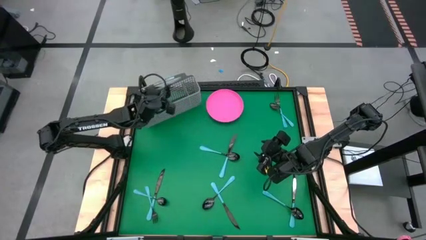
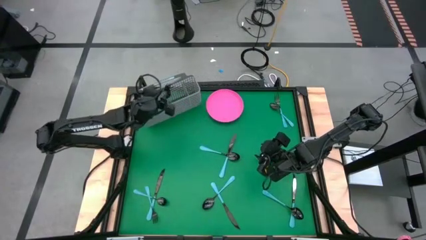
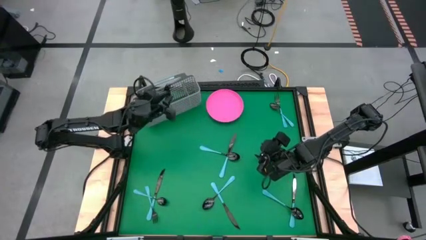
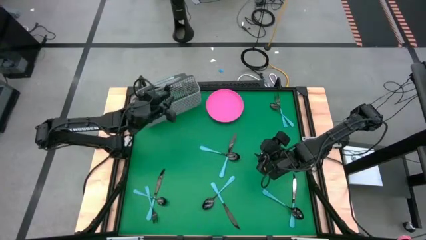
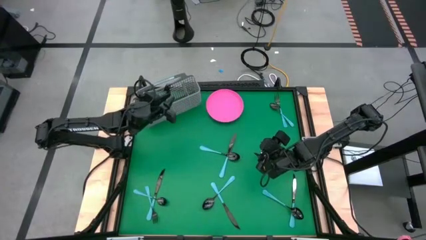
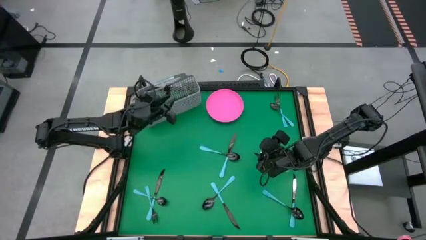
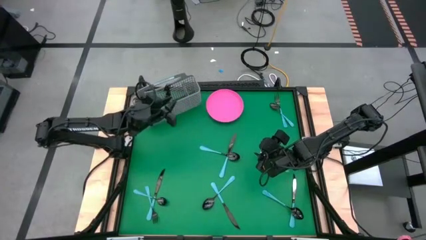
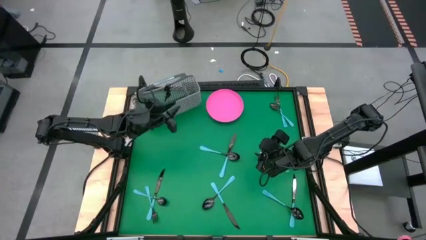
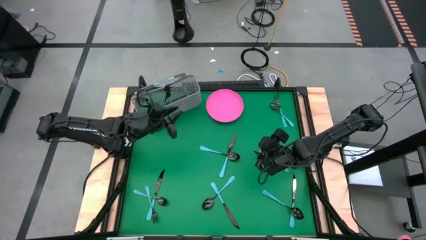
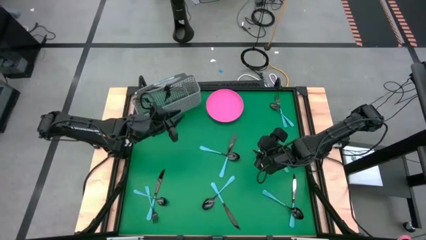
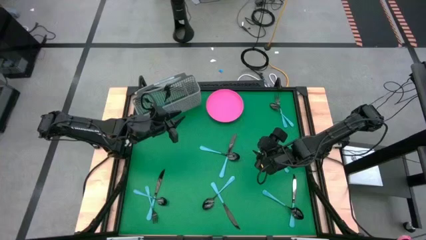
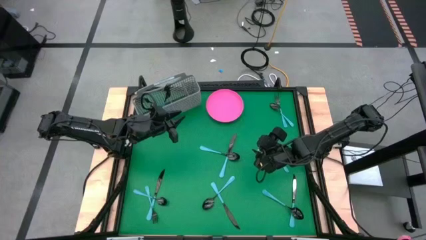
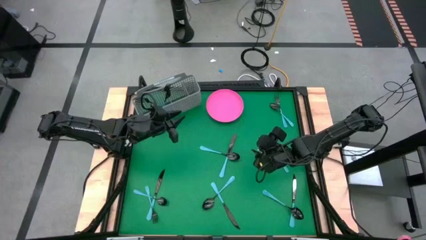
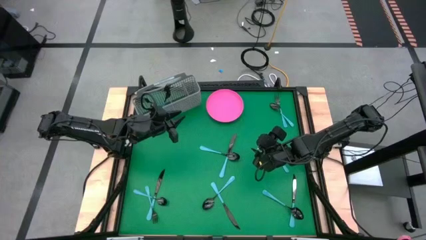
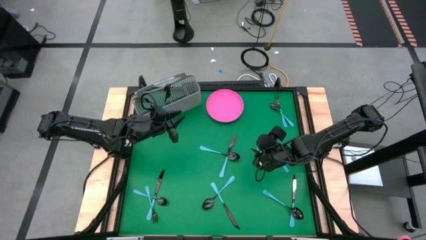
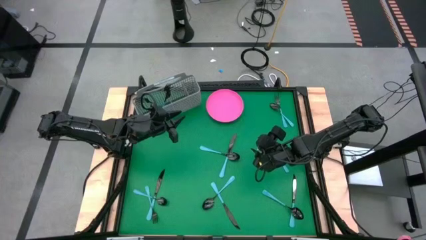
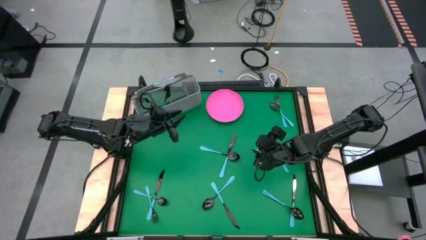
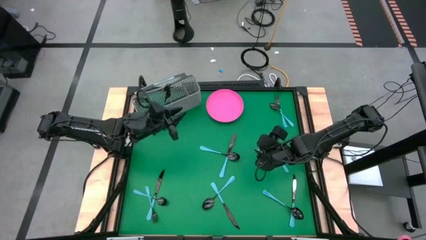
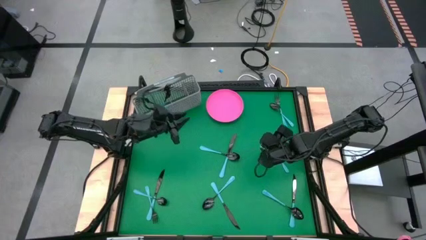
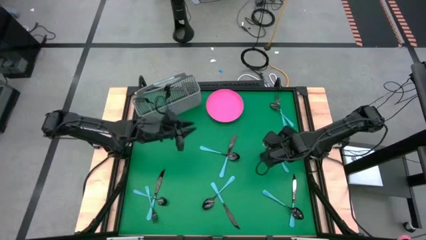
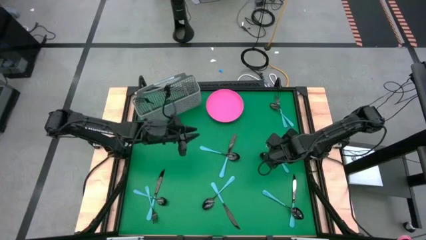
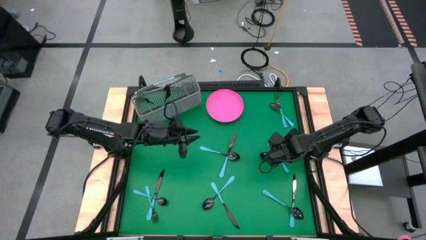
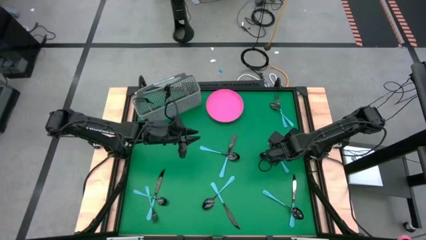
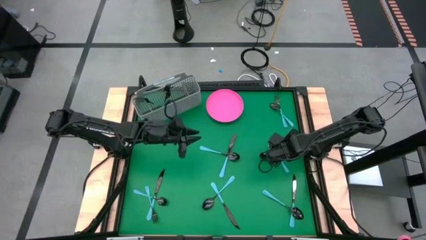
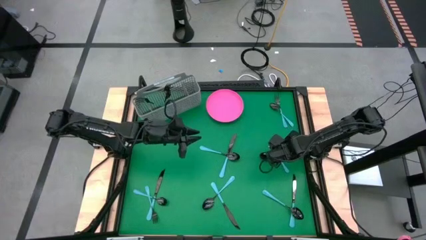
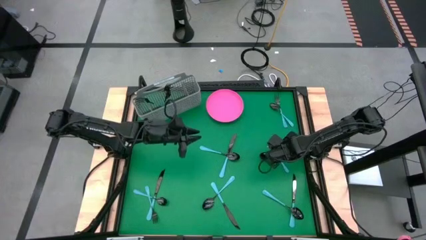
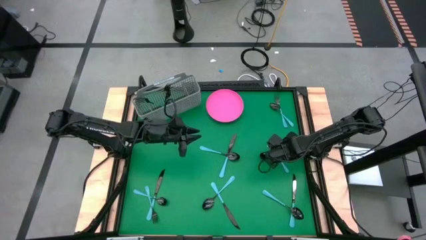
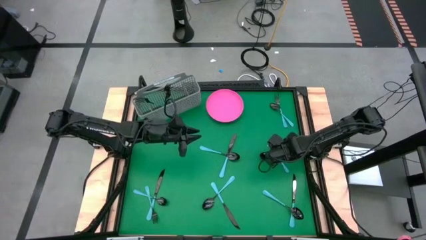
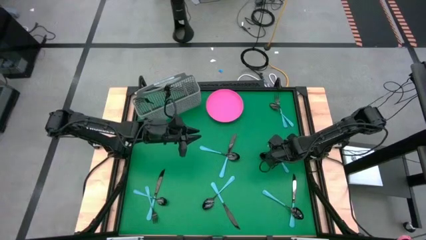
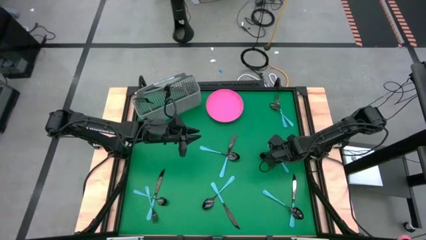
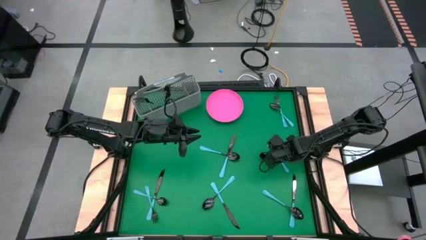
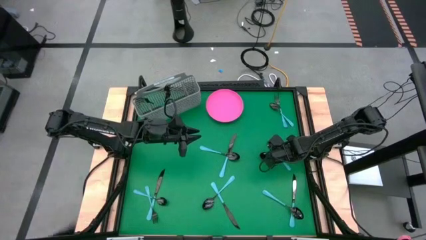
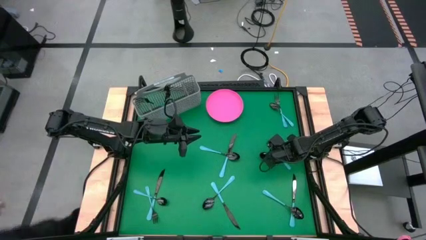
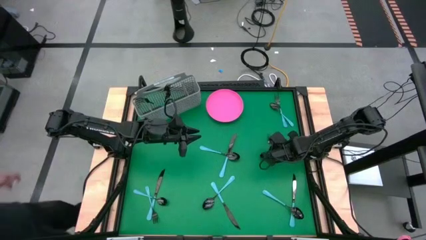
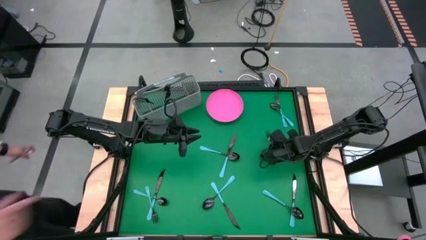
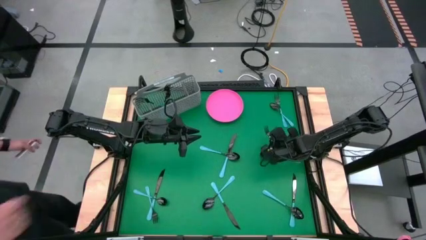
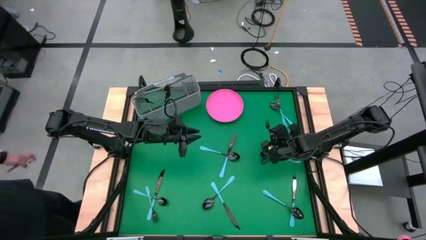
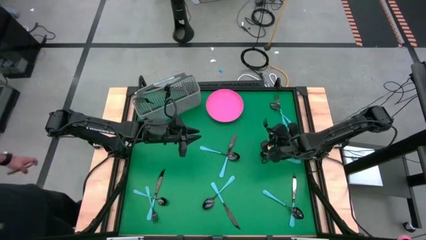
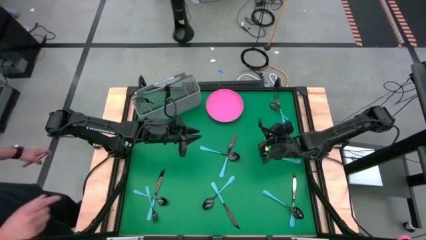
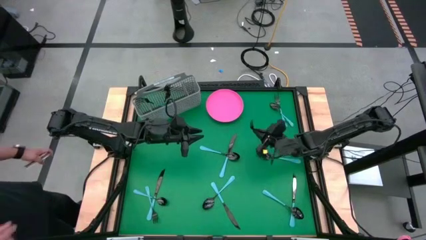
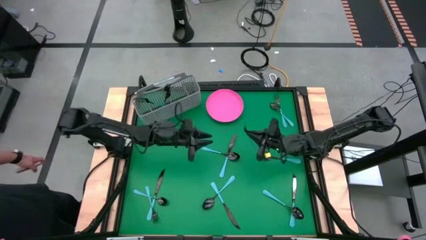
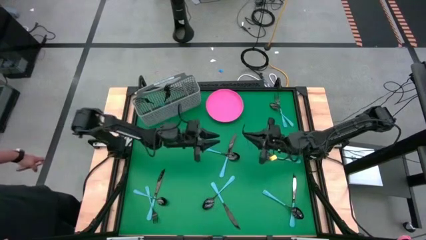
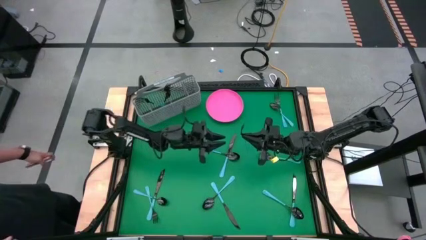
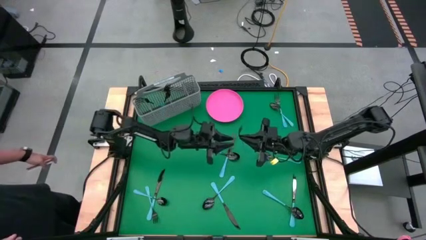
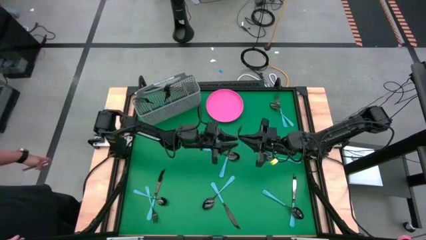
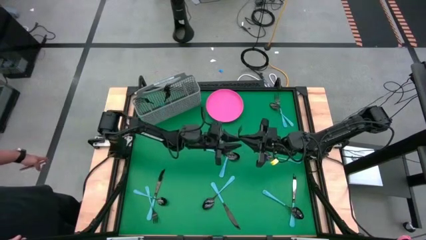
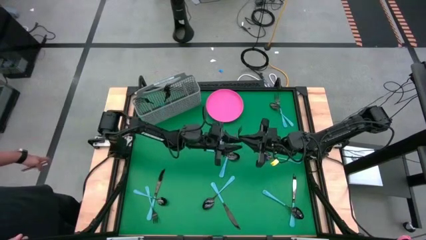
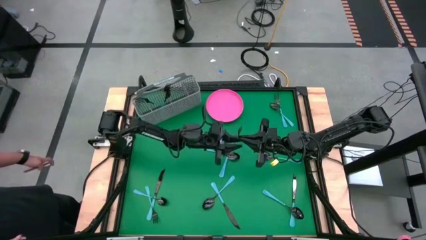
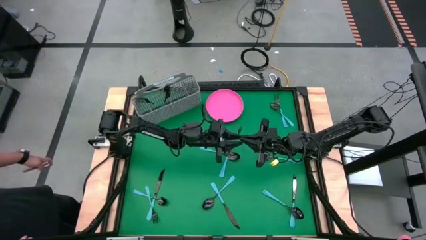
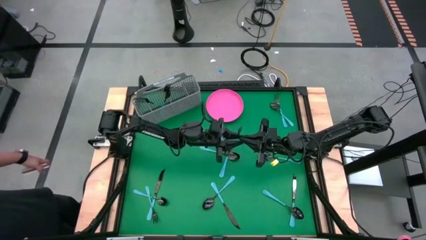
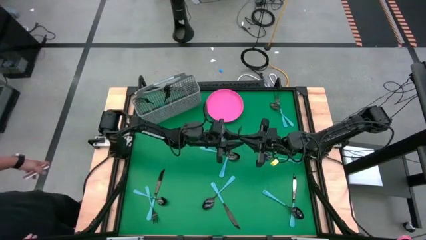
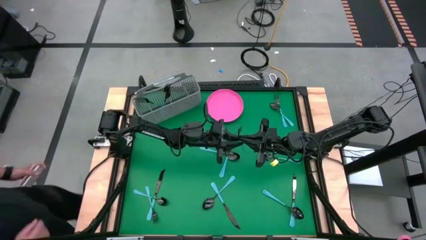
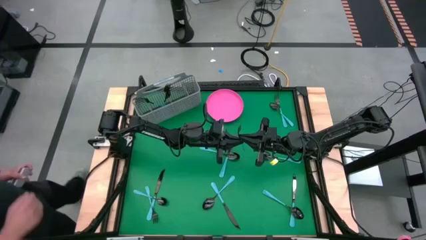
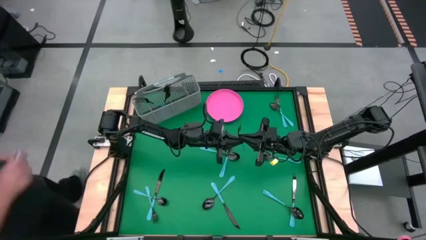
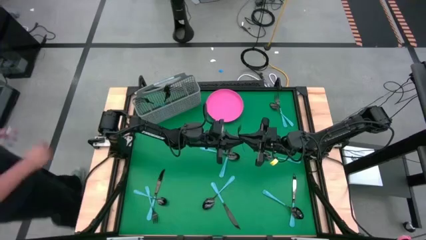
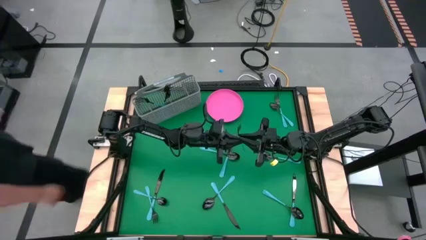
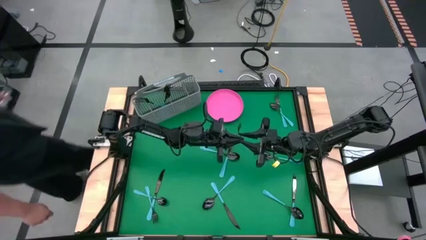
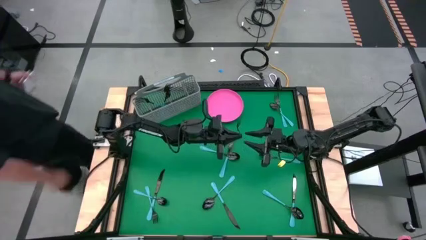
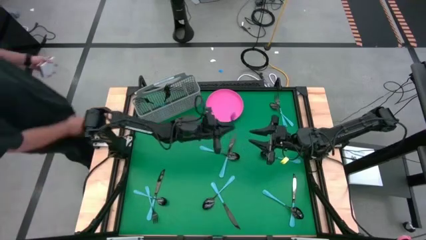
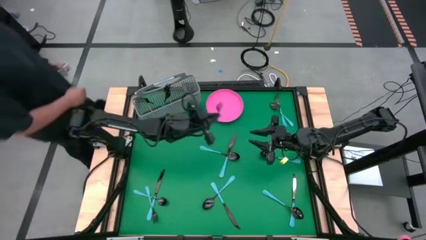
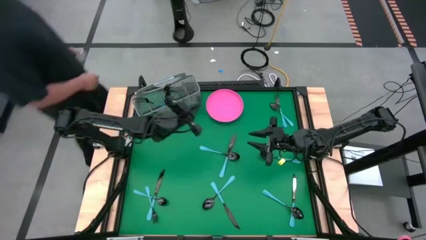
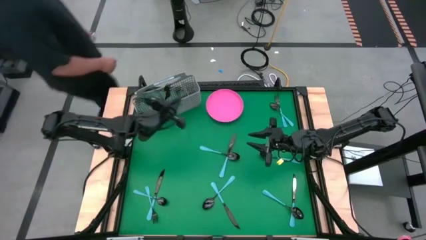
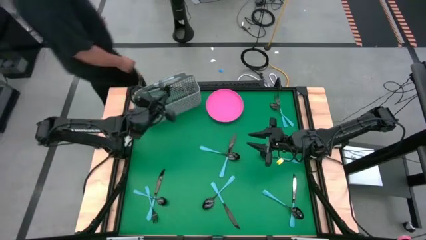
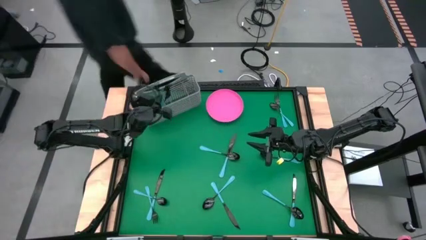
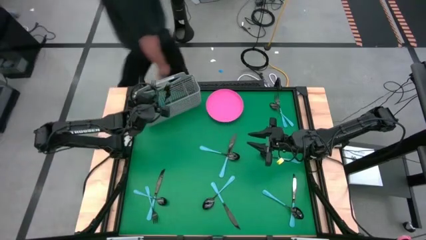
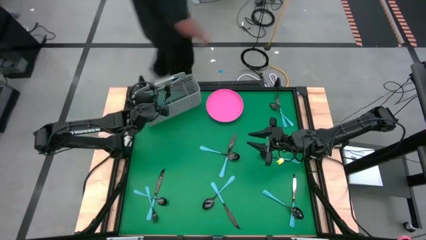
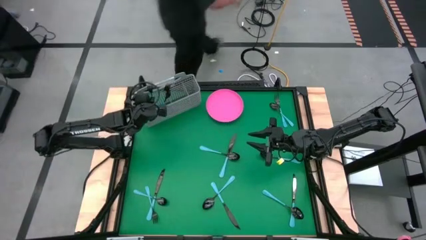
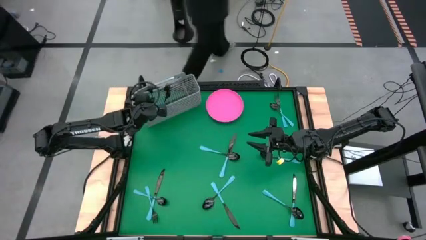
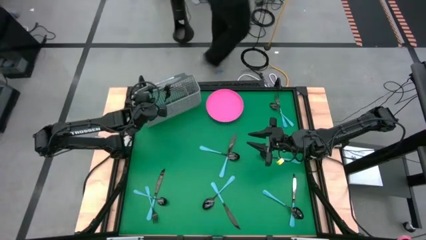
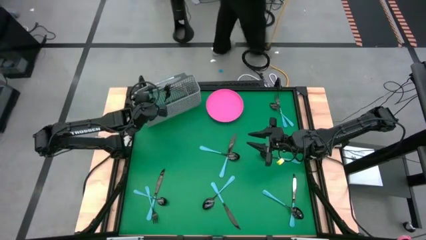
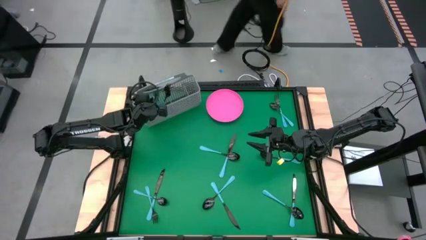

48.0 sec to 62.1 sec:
Task: Sort silverware
Put the blue fork into the gray silverware holder

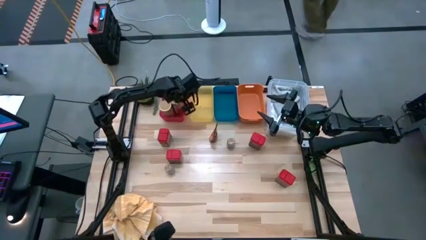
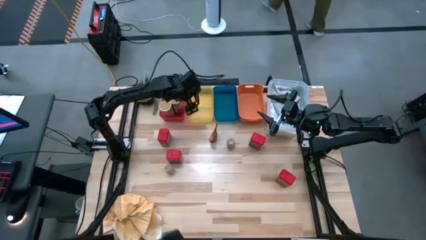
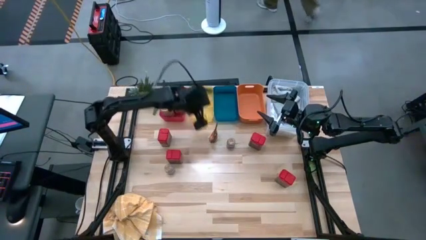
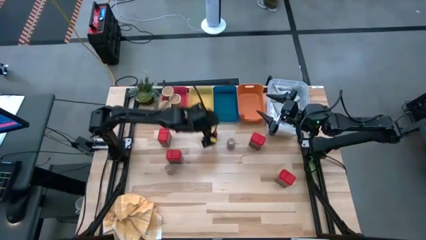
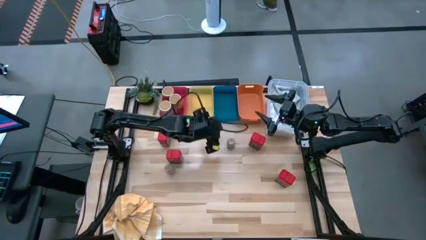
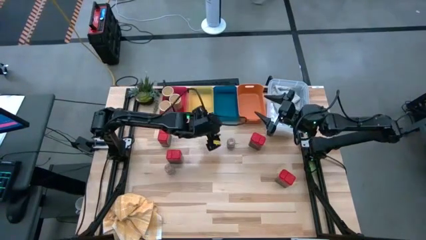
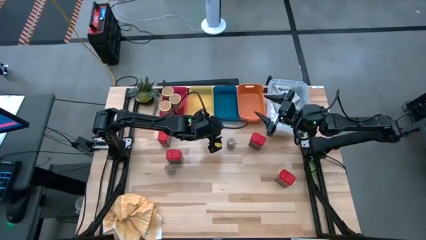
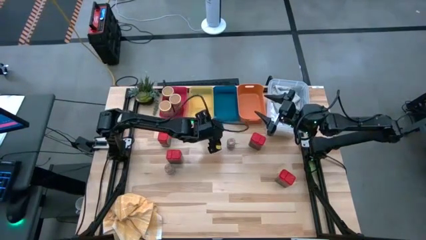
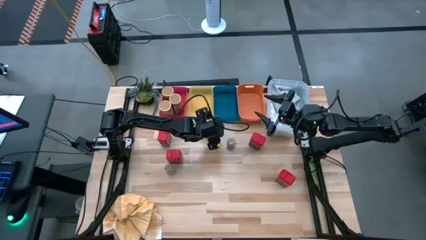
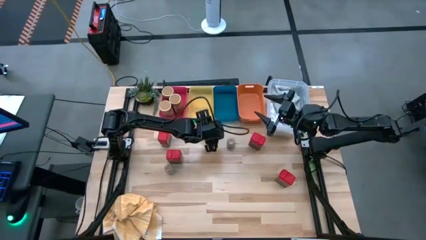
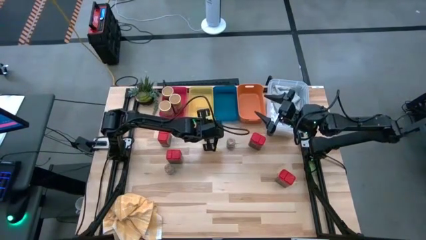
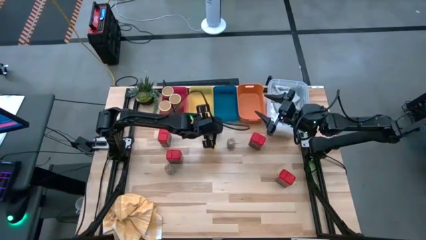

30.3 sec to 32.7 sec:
Task: Sort spices by type
Put the orange spice pack into the yellow bin
